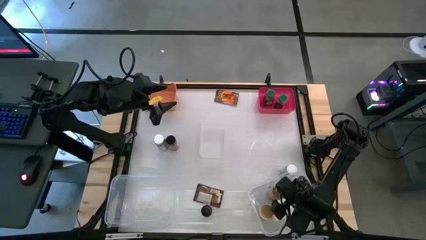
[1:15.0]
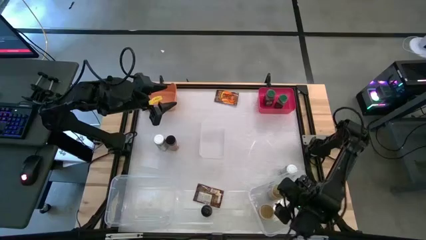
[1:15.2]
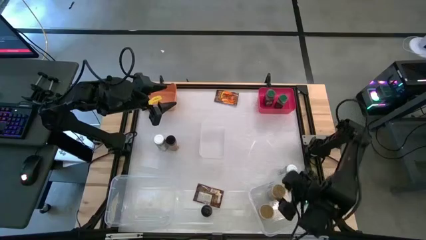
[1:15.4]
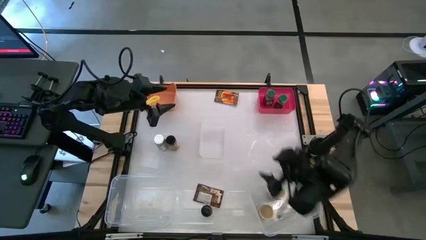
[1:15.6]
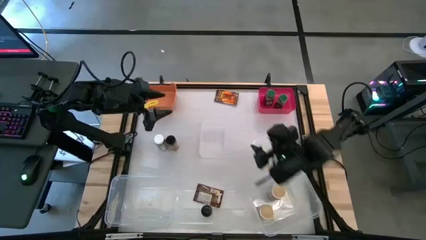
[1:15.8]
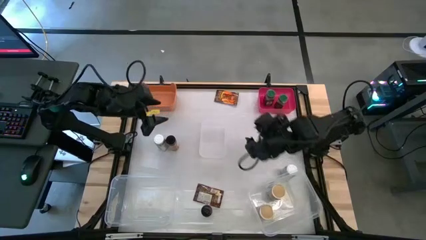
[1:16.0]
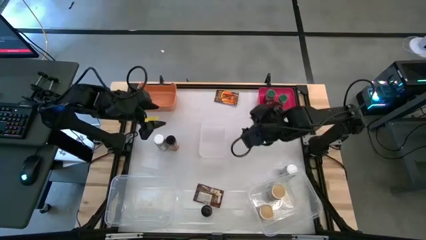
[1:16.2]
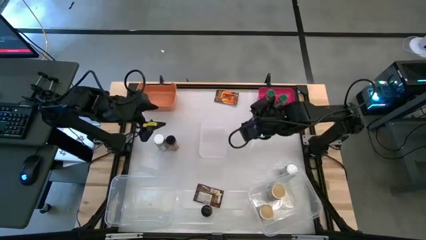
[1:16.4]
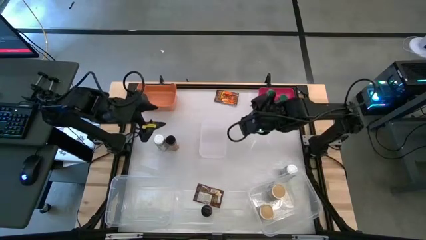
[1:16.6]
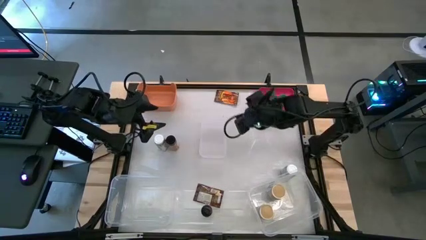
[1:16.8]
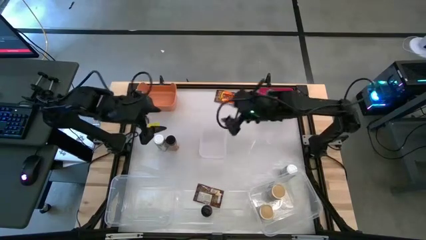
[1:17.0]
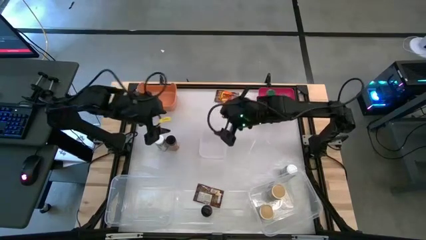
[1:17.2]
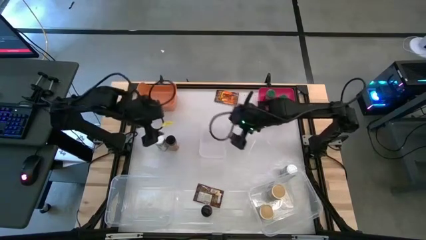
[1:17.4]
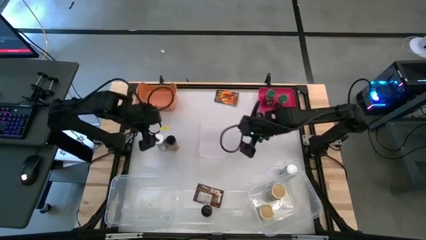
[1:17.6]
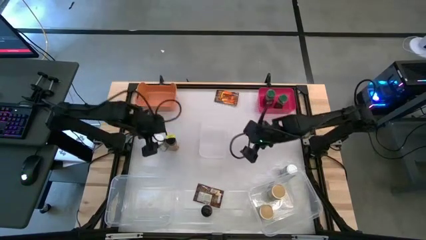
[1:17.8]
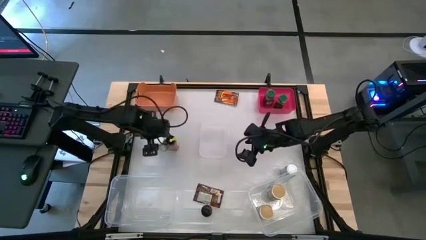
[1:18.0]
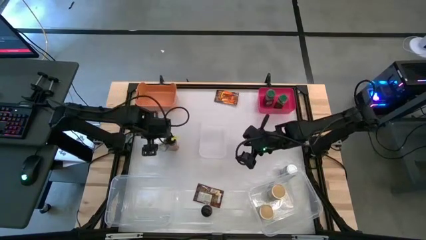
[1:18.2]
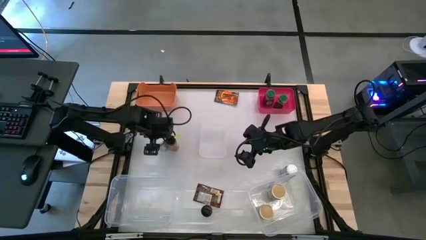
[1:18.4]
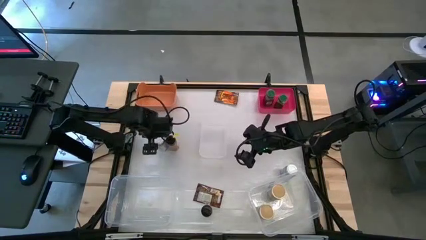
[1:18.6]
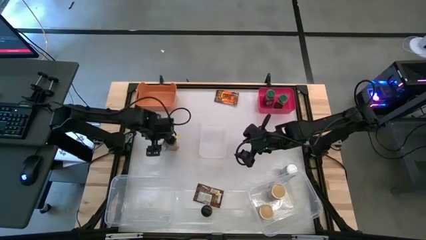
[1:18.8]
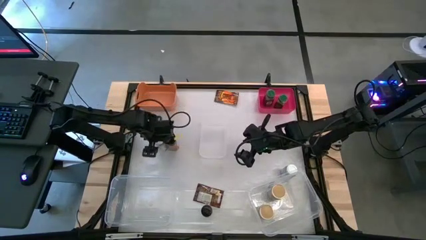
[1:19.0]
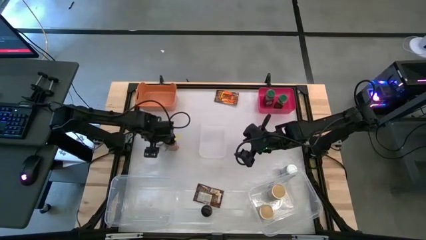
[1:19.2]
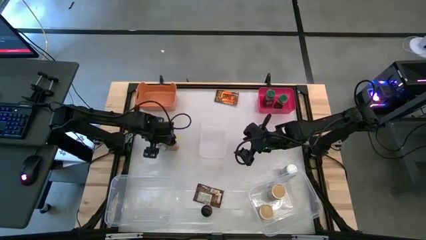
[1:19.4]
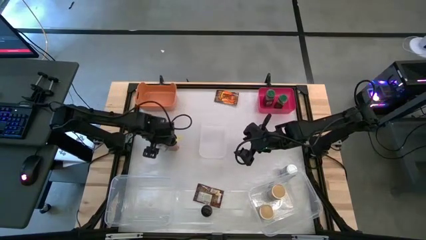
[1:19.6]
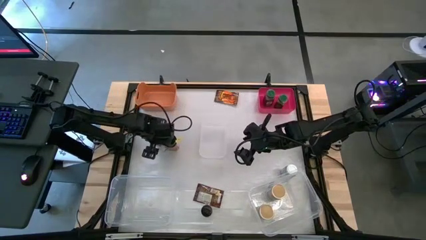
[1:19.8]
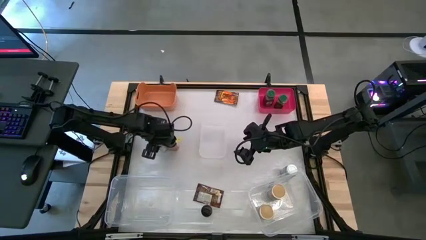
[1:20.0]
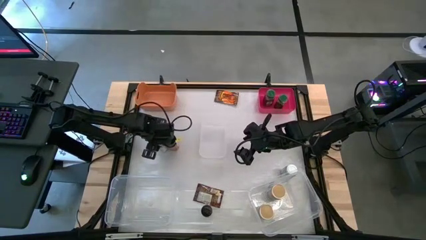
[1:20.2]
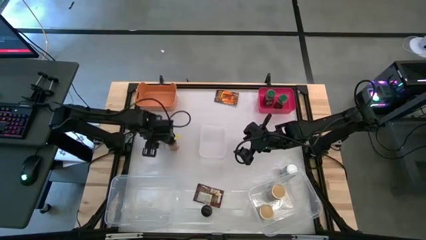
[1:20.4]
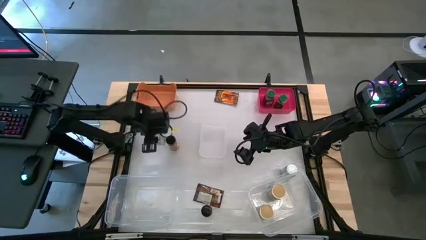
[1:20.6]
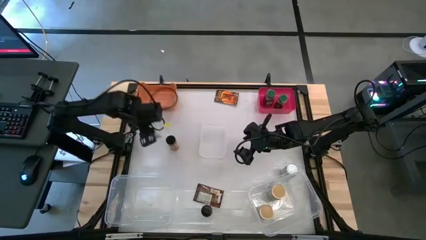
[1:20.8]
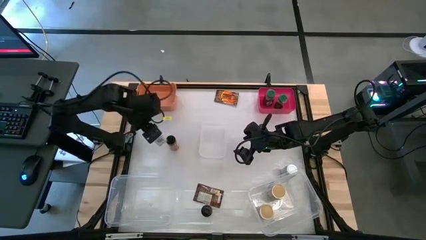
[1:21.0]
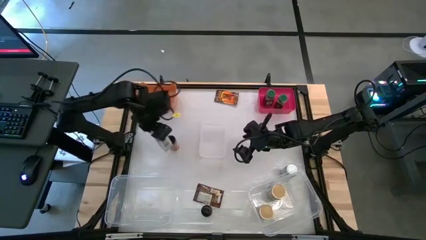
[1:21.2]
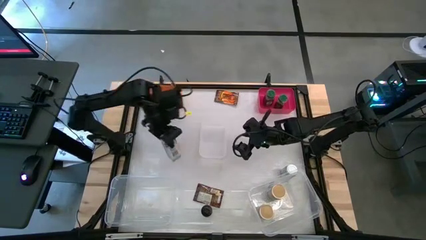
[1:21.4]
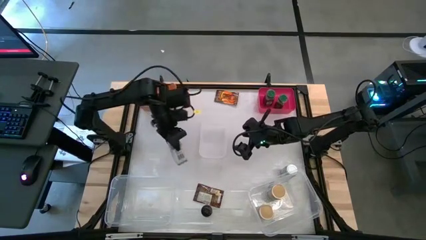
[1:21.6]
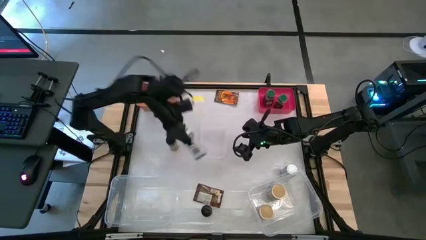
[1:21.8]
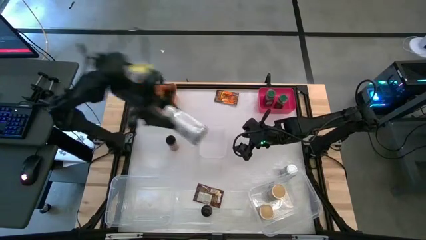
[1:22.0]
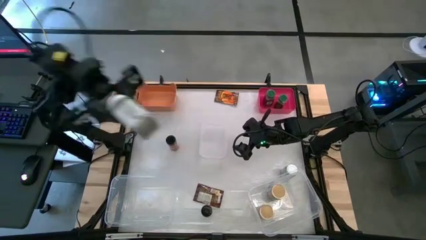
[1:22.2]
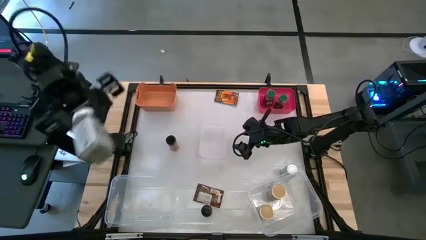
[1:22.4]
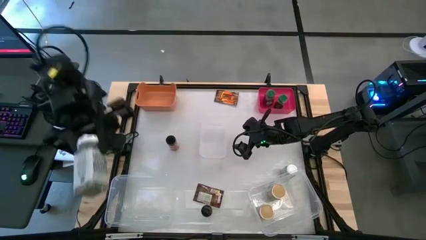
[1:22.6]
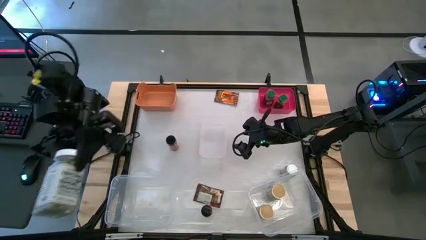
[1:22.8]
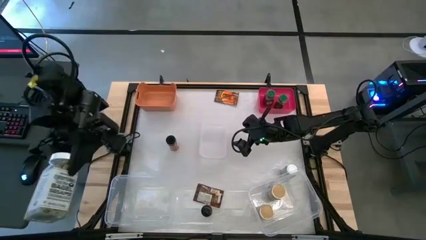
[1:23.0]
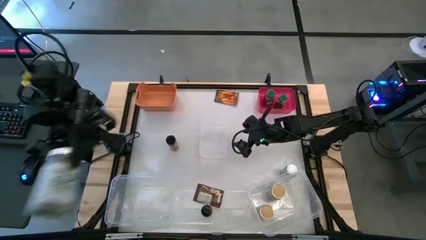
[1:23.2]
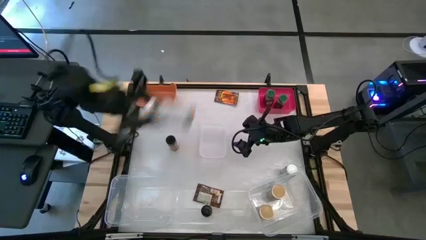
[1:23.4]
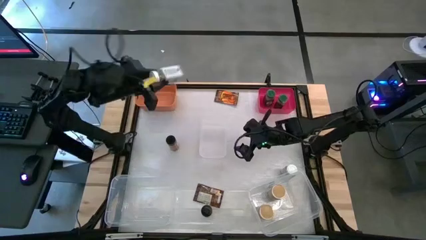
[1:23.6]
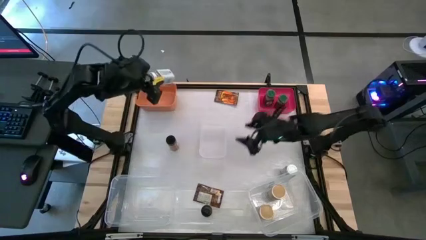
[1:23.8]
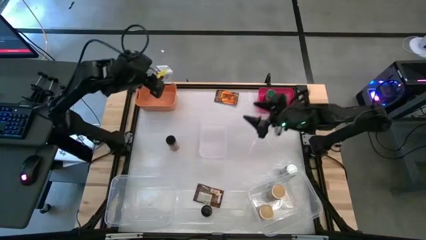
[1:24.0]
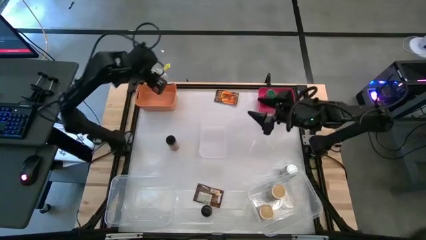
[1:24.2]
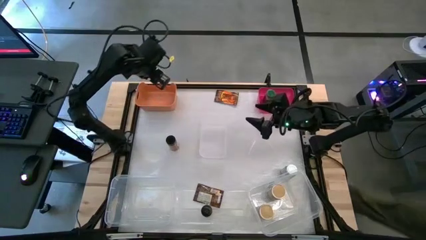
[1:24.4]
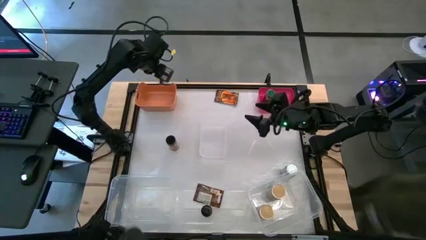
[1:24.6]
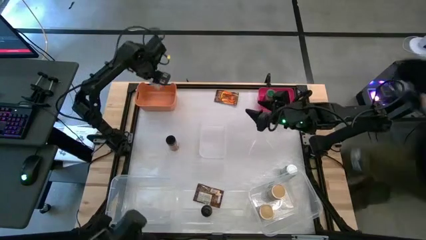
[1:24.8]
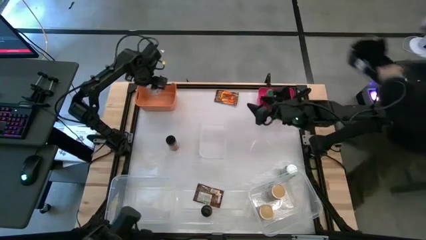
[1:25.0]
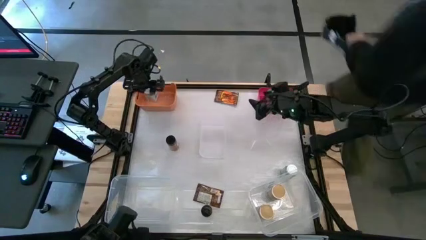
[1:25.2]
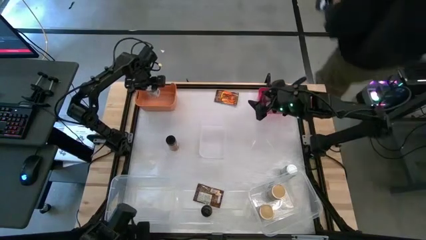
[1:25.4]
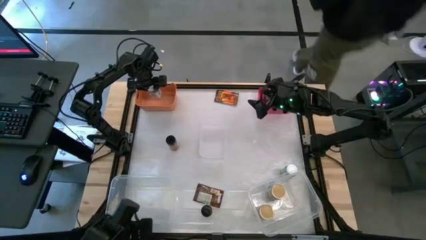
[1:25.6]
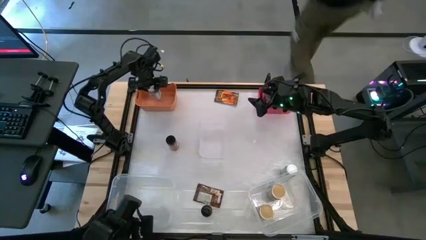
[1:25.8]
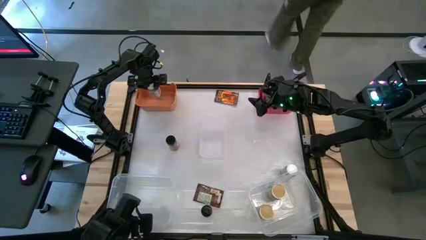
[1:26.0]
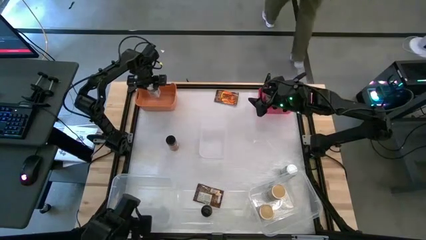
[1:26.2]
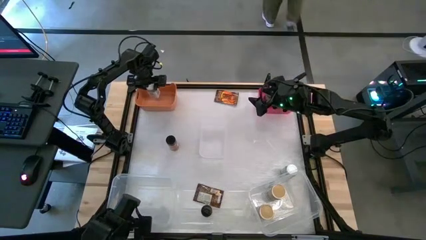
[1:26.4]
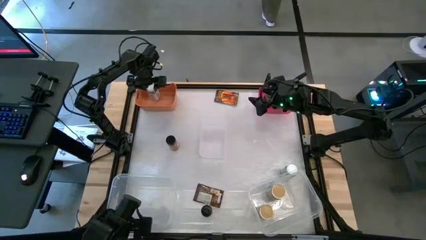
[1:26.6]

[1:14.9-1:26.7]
Task: Sort spices by type
Put the top white seasoning bottle into the orange bin

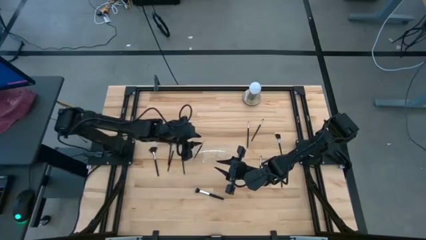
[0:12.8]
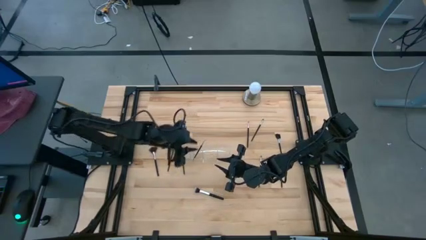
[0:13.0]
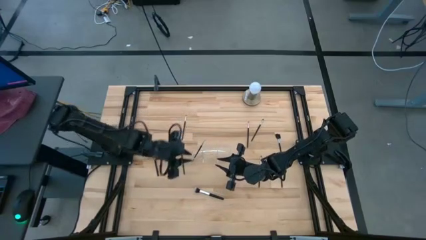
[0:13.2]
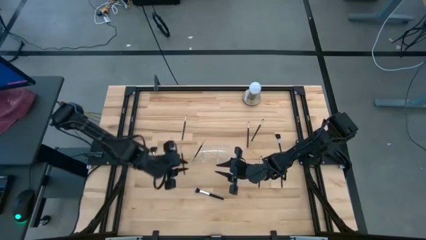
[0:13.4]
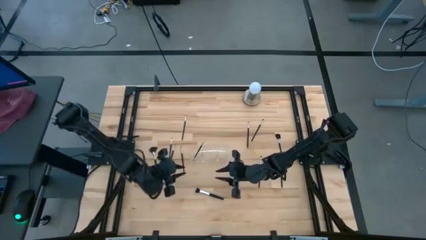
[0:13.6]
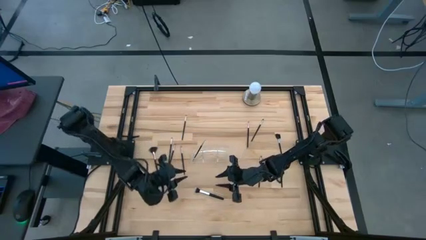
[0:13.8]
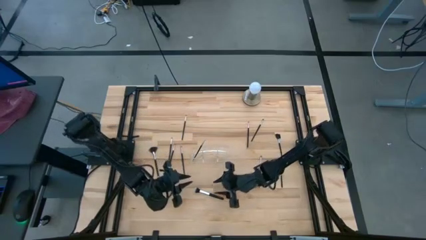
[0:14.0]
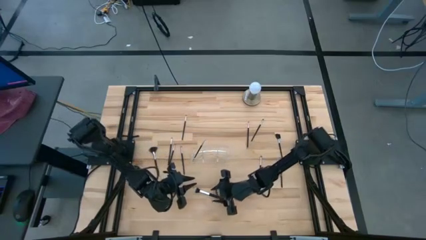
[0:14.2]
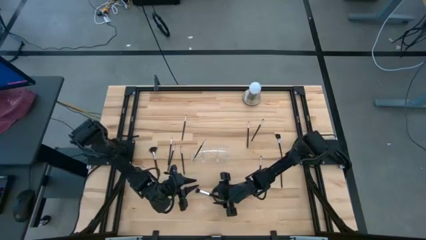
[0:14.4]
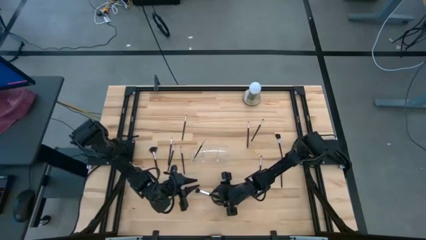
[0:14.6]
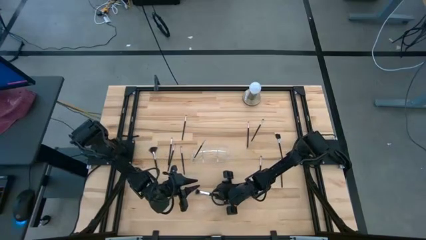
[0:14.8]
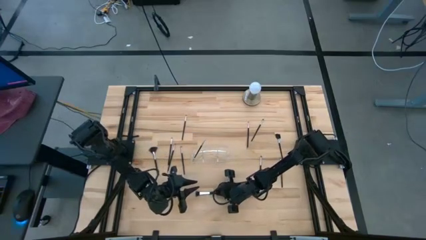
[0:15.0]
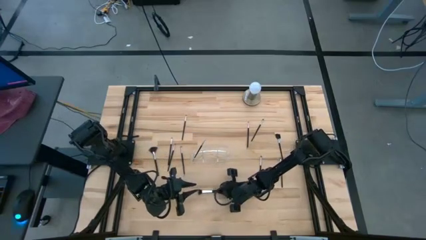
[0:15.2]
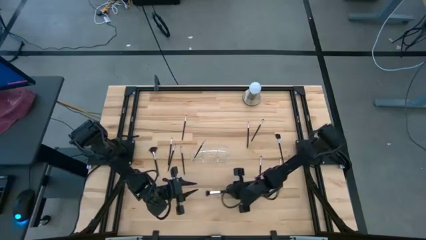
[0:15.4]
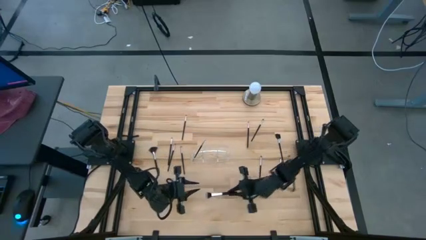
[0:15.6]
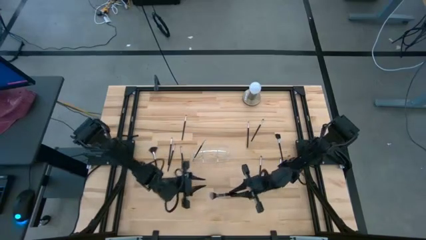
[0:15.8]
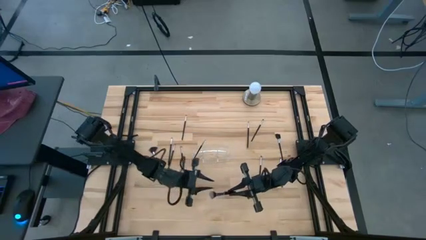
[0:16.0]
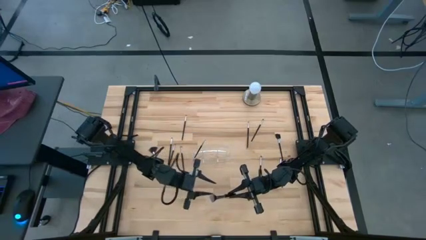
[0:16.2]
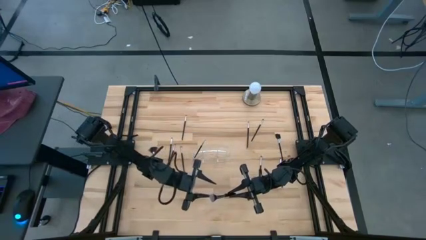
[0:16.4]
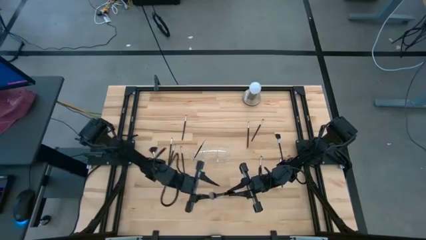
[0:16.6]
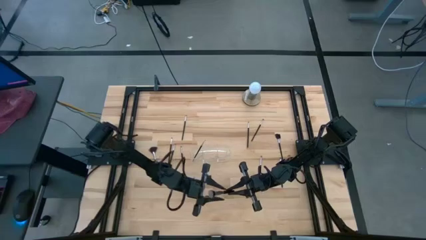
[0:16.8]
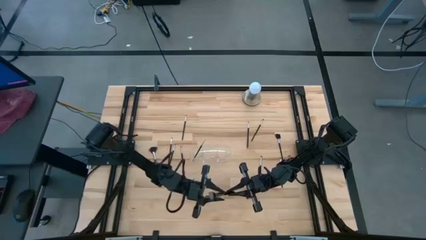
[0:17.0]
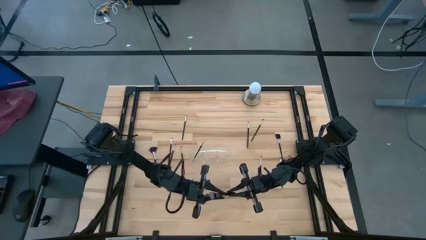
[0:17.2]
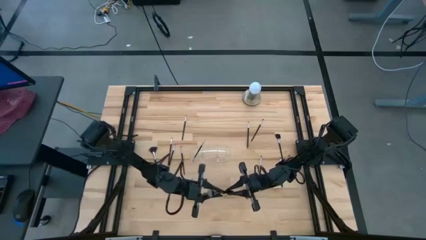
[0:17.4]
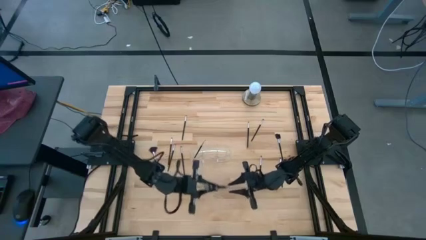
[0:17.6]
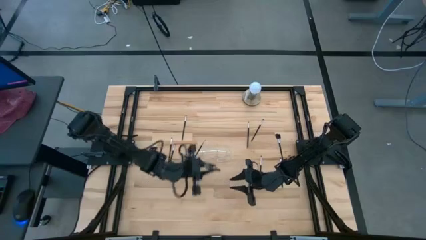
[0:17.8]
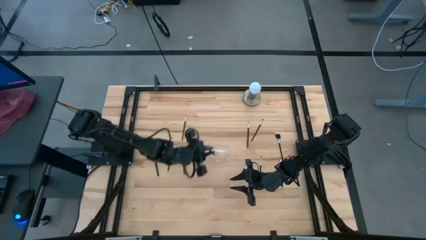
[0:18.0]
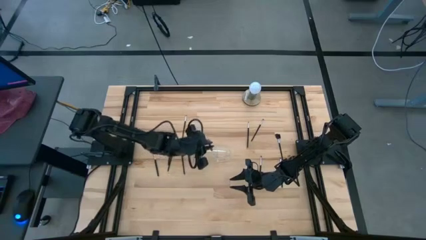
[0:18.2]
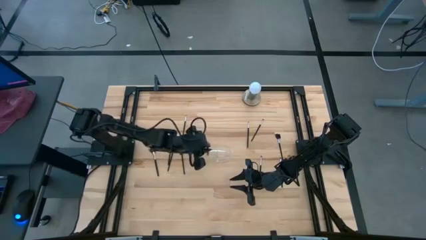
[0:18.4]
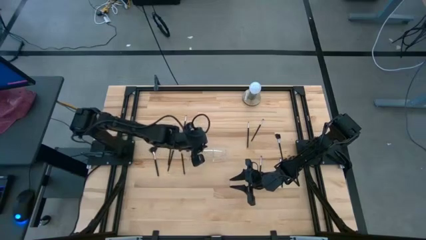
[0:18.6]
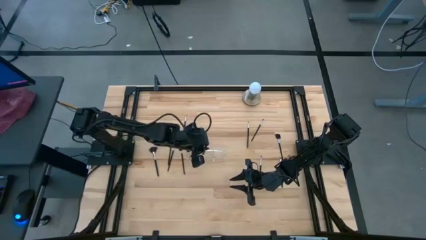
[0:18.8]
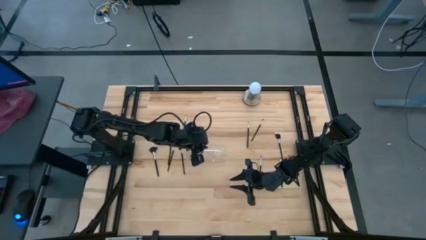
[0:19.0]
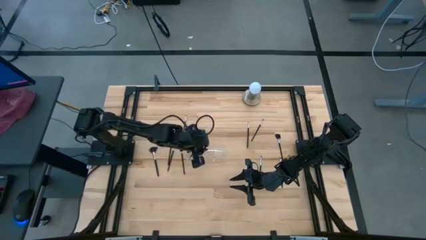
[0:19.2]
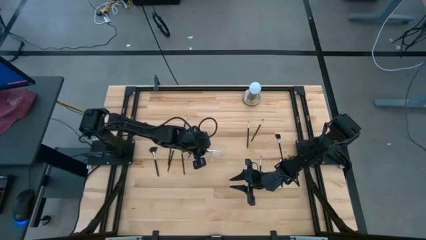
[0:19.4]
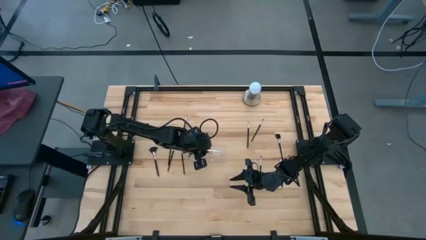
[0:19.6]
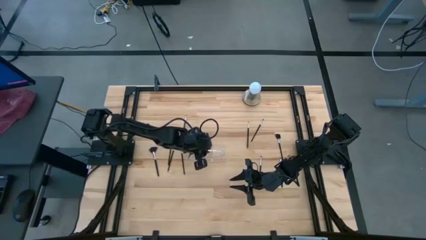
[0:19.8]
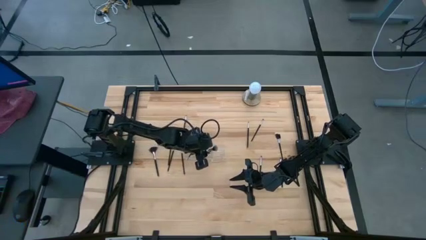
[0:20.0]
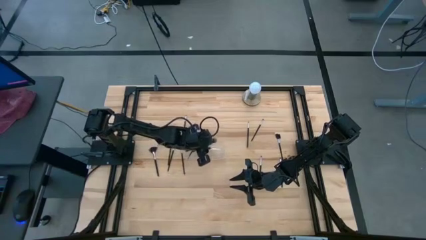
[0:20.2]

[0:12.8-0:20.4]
Task: Put items in baskets/containers
Put the powder brush into the transparent organizer
